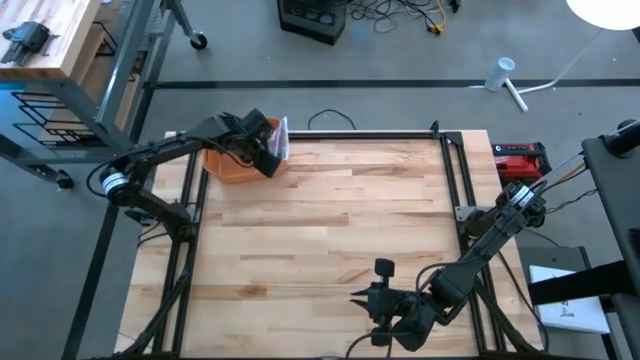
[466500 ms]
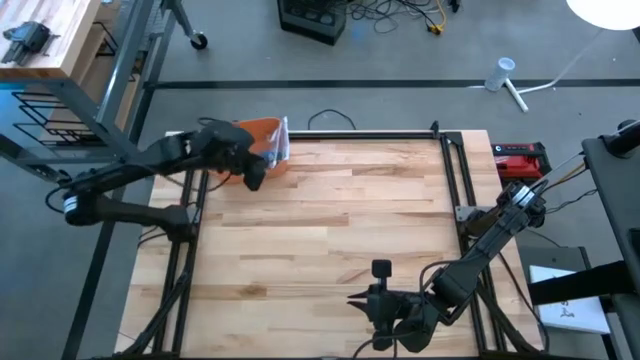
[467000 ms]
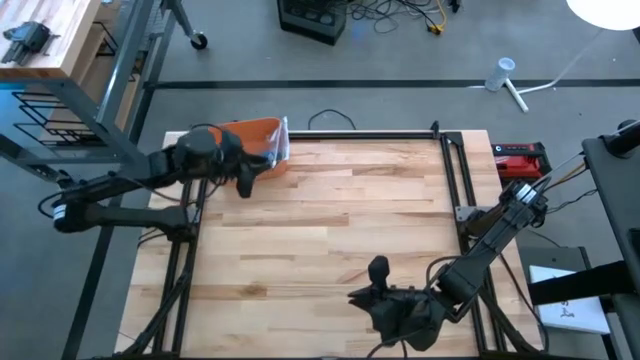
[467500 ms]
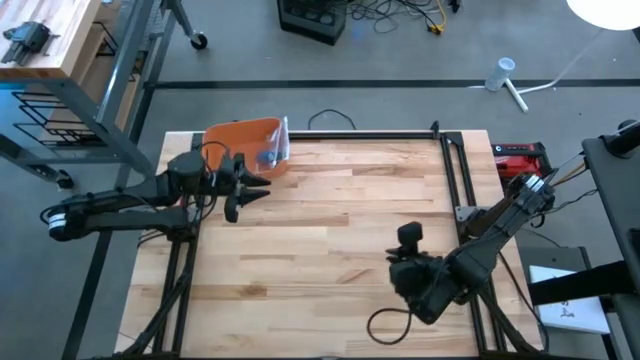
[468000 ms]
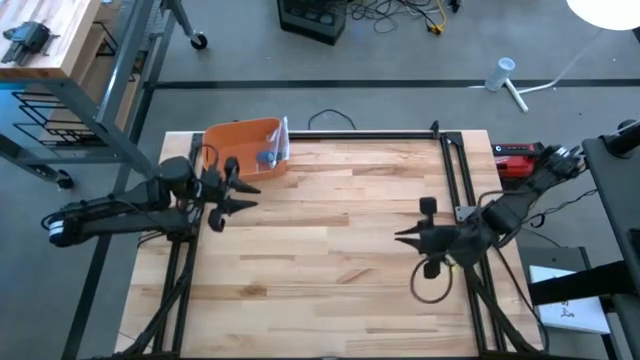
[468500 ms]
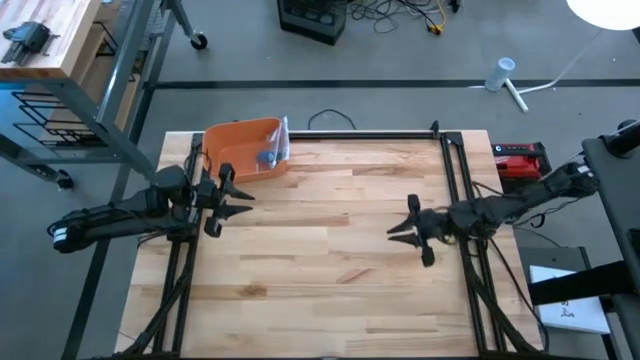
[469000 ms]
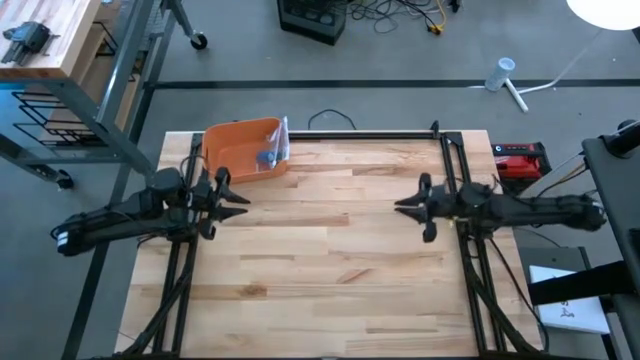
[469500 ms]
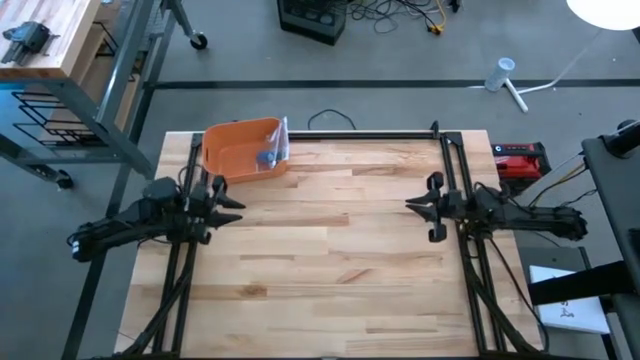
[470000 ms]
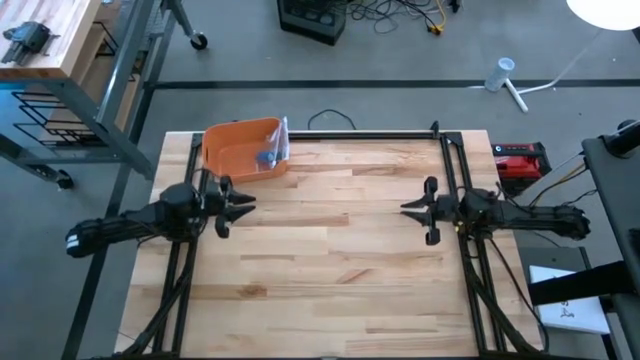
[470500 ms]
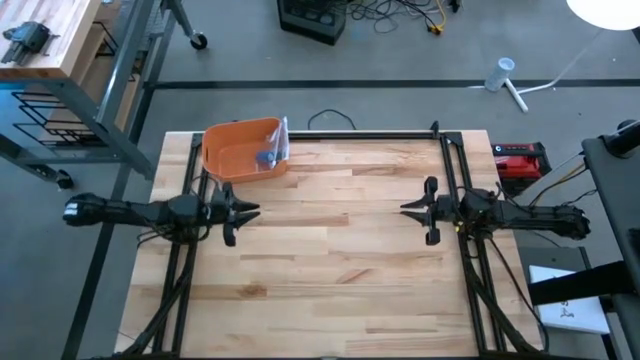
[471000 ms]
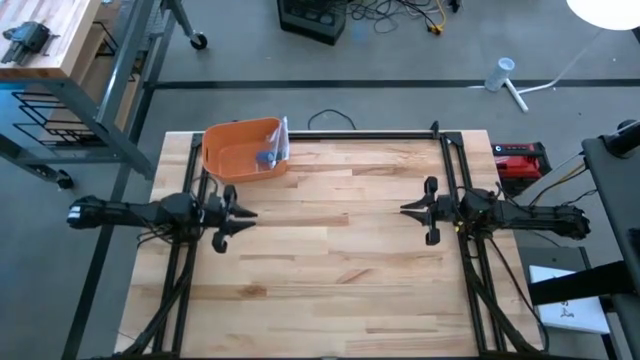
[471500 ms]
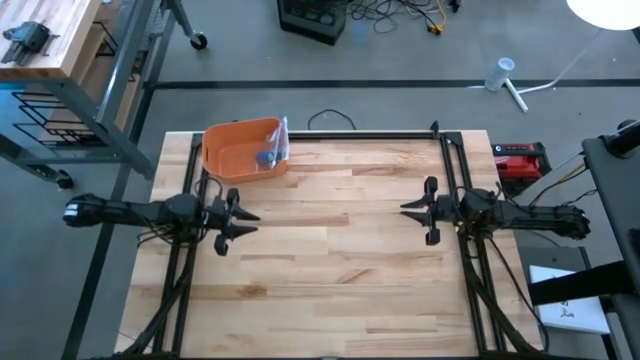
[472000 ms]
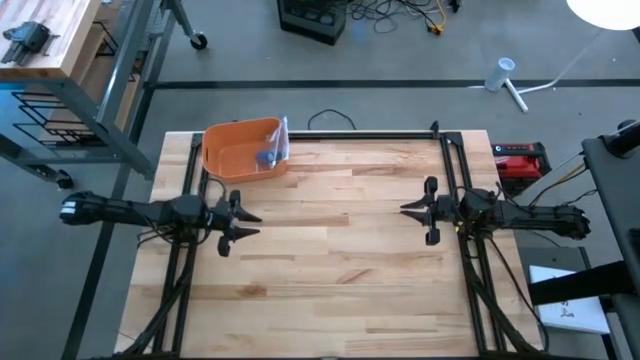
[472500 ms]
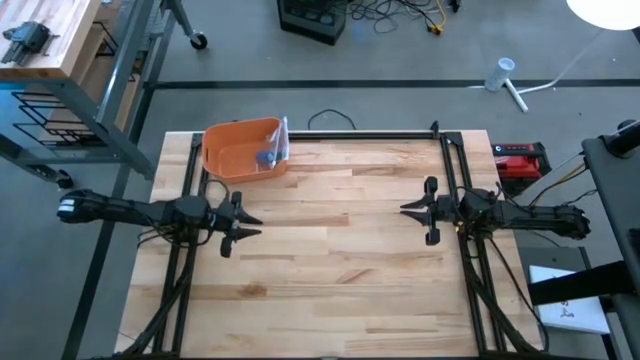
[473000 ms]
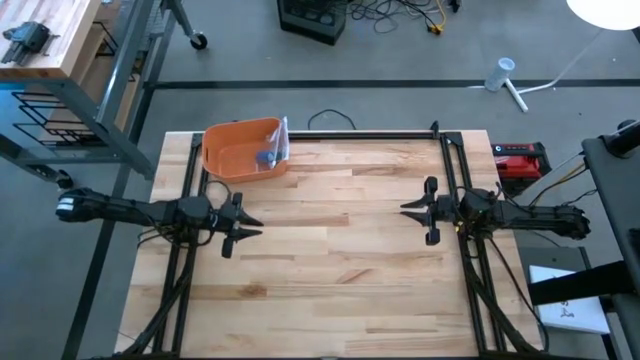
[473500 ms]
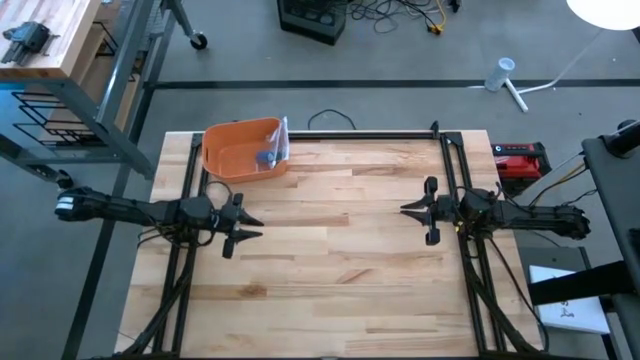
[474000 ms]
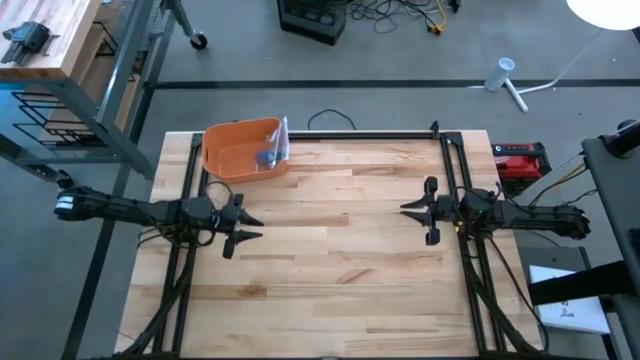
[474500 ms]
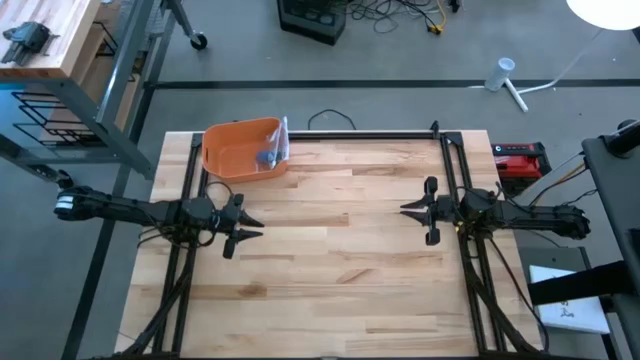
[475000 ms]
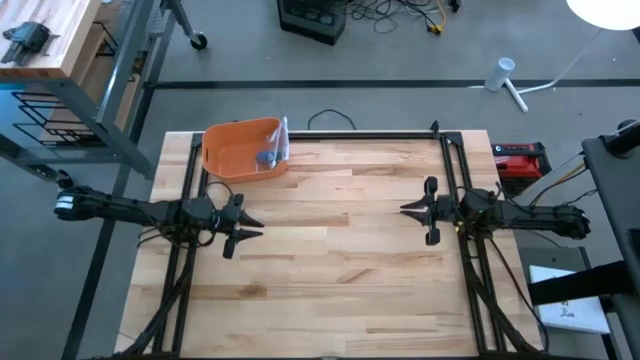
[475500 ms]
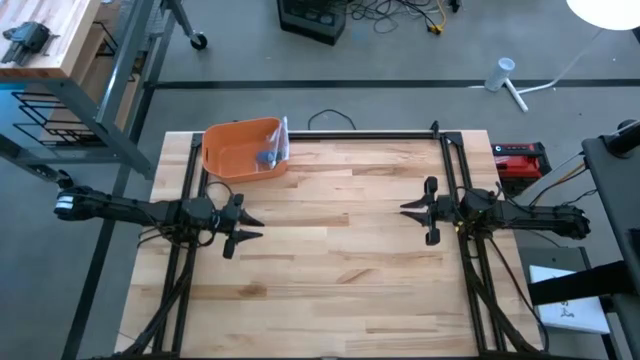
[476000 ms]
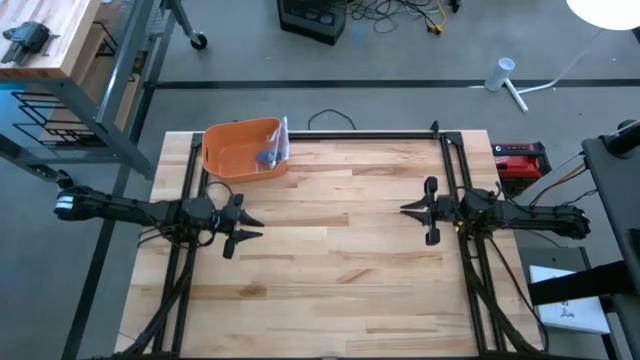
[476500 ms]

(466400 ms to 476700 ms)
Task: Roll bandage
Return to Home Position

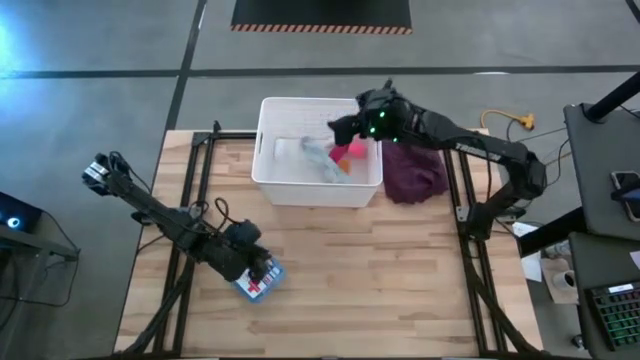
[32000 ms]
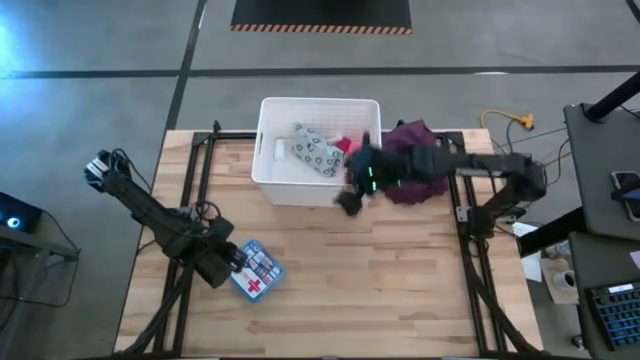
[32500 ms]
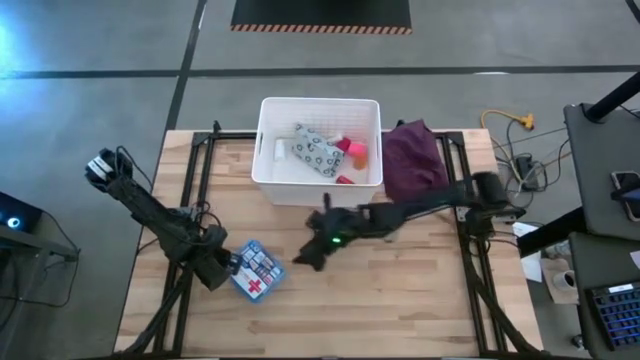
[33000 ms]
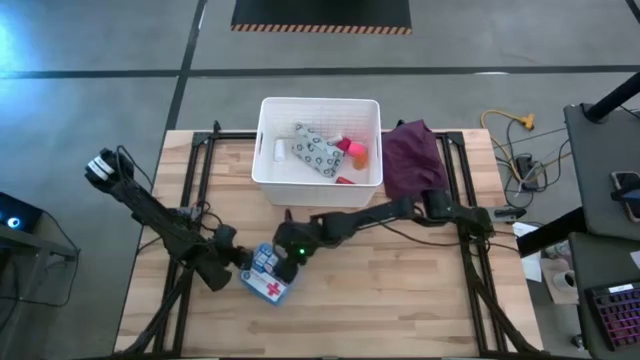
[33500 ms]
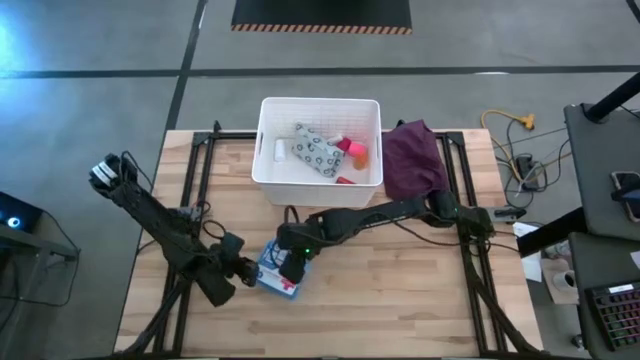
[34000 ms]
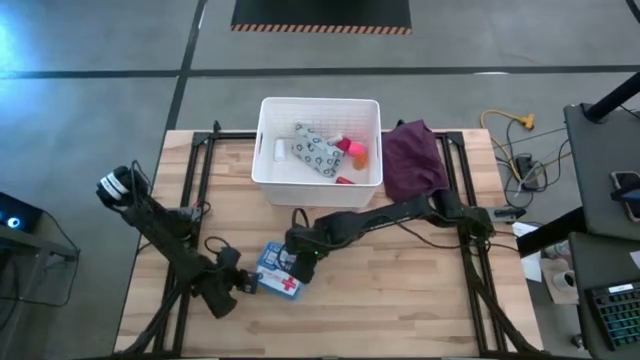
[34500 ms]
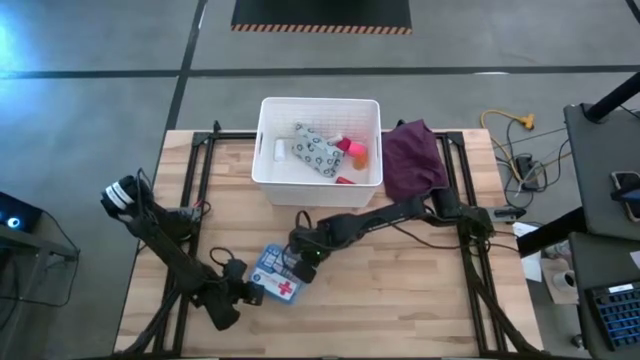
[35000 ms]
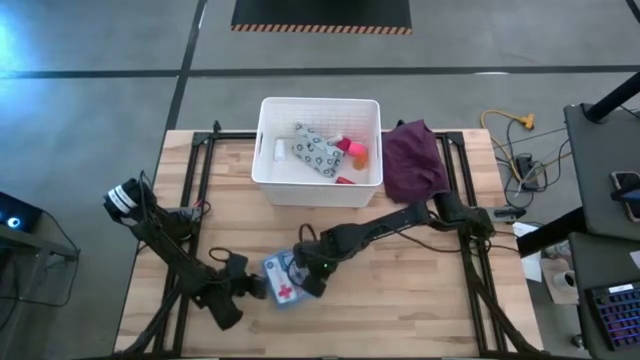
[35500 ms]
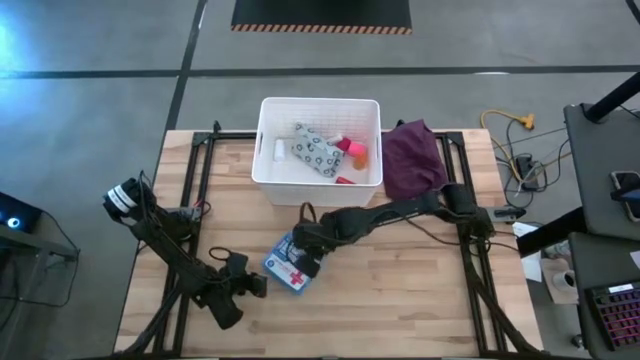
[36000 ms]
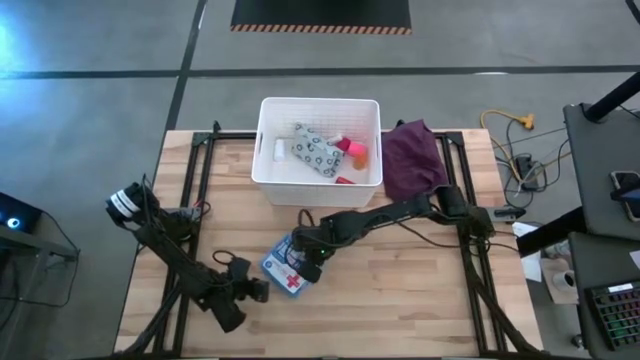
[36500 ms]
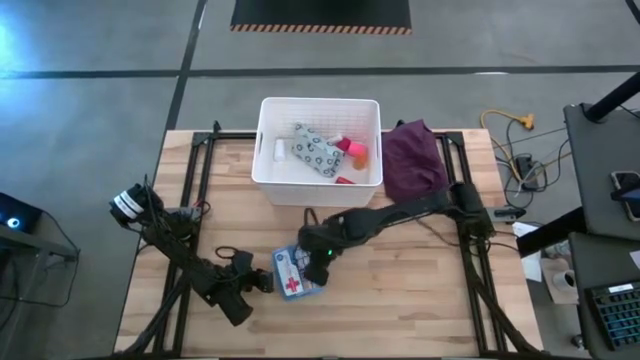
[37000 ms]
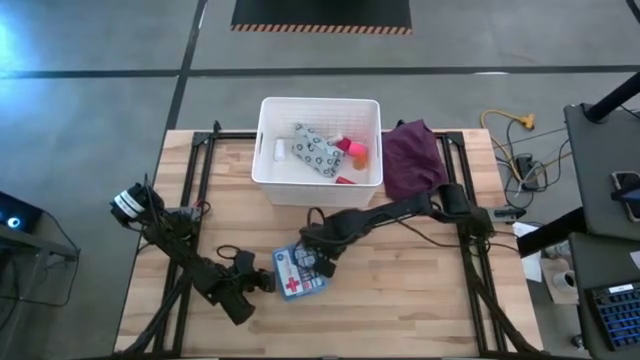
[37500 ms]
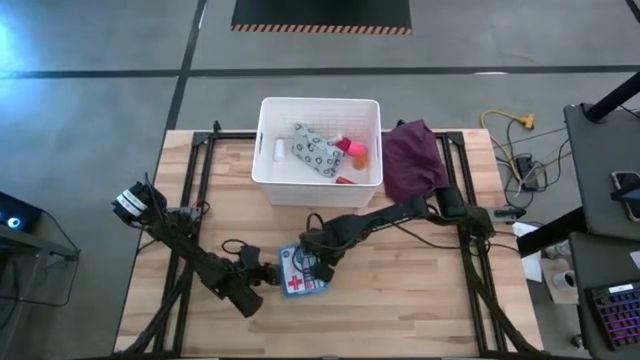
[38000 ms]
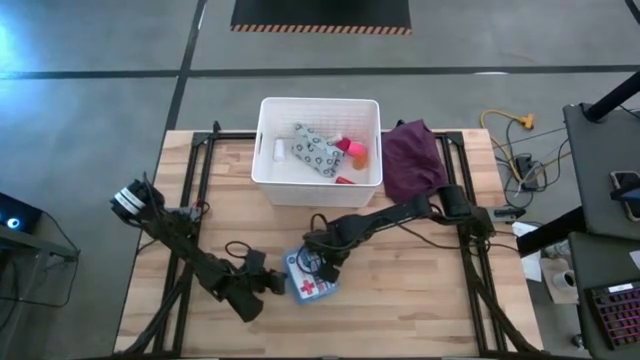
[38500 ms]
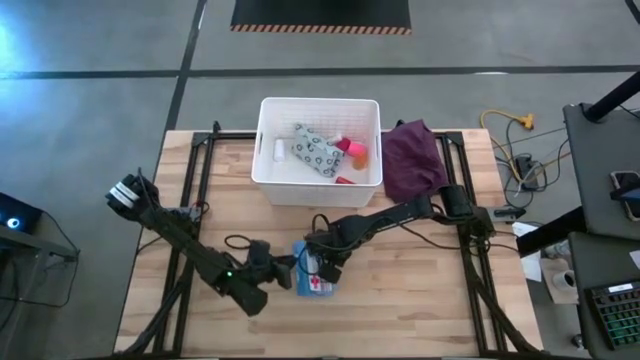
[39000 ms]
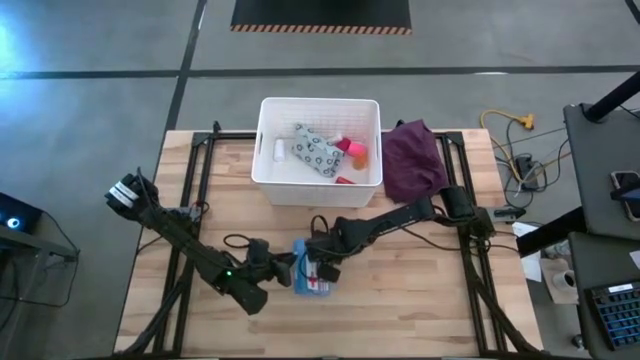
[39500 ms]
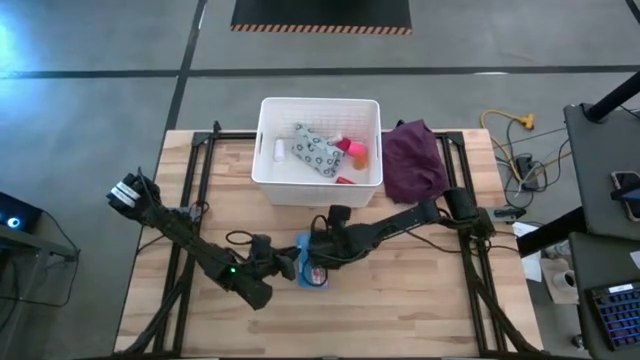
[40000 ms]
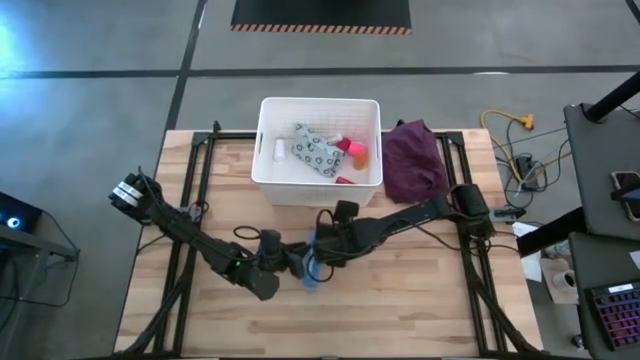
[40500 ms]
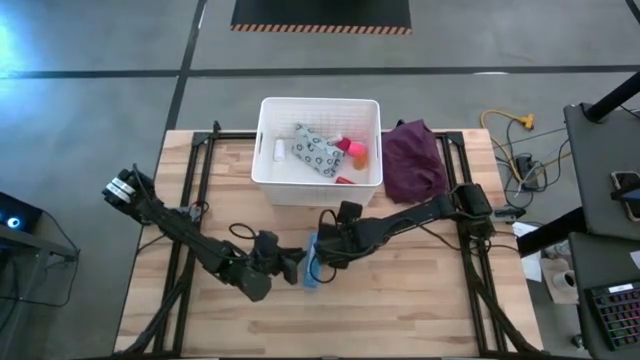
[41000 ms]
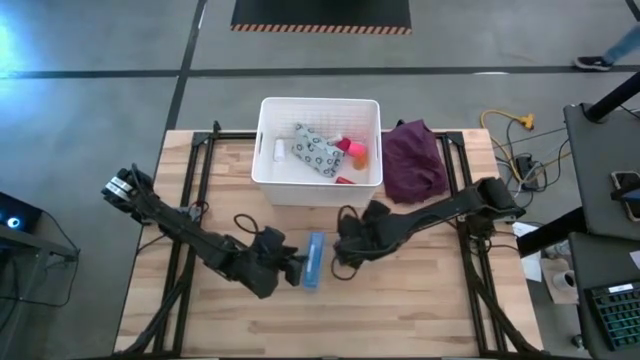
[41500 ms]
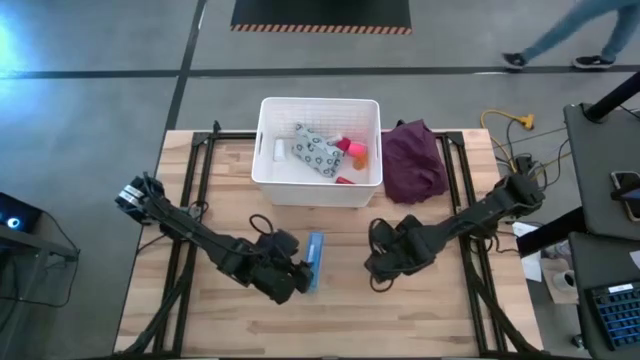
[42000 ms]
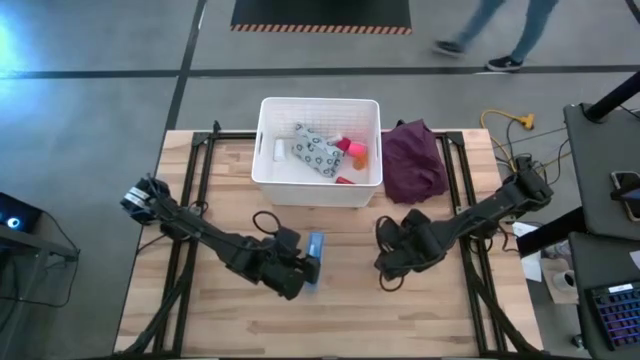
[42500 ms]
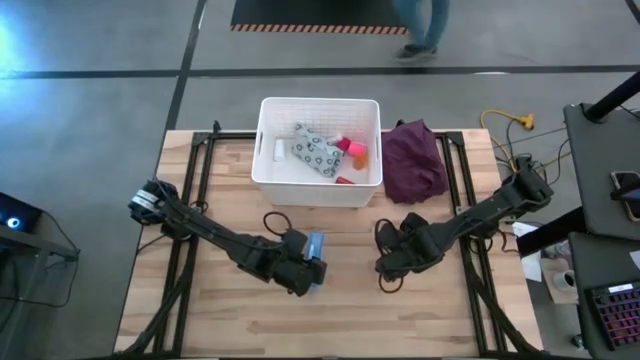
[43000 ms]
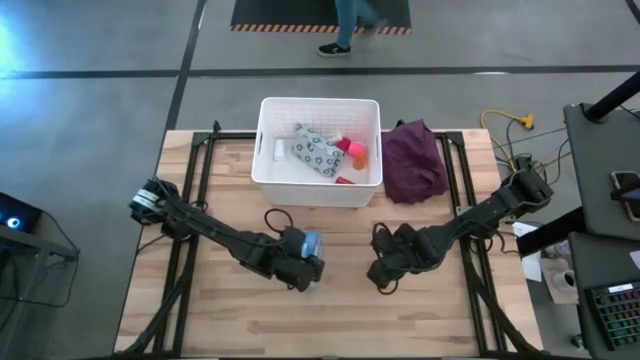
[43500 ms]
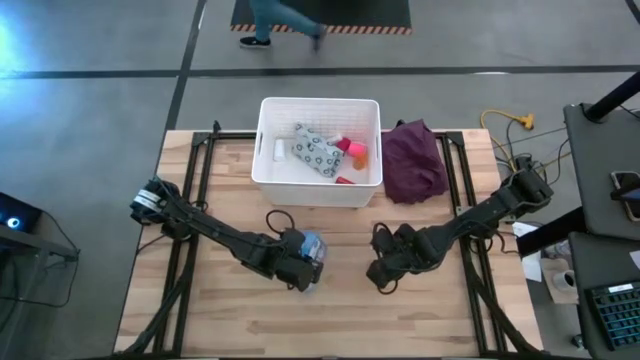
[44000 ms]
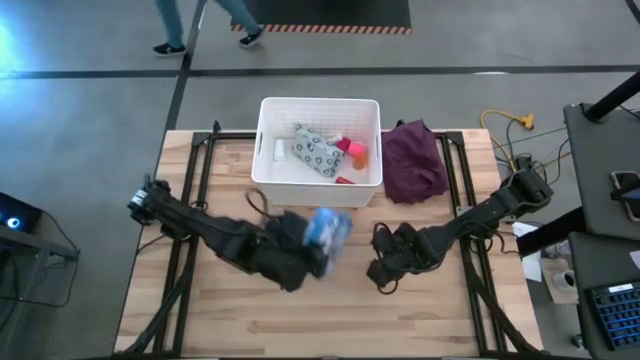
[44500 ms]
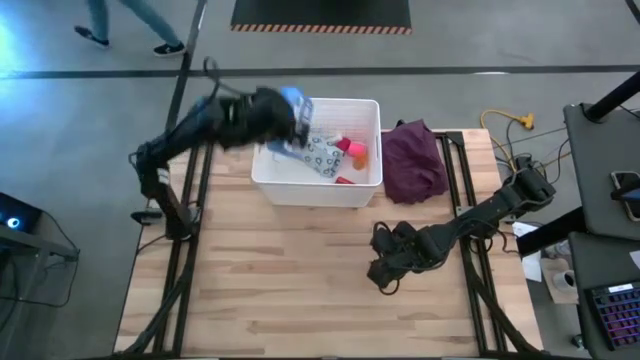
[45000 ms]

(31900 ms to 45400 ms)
Task: Pick & place medical supplies in basket/bin
Put the first aid kit into the white bin
